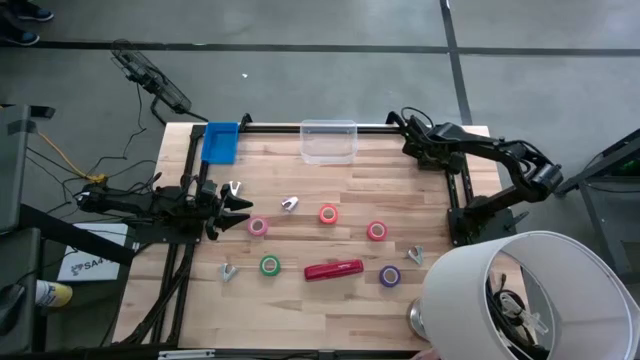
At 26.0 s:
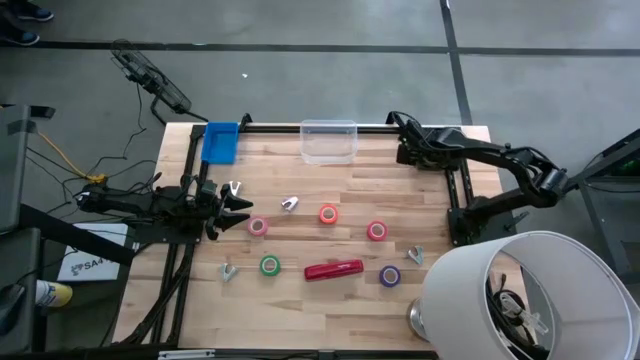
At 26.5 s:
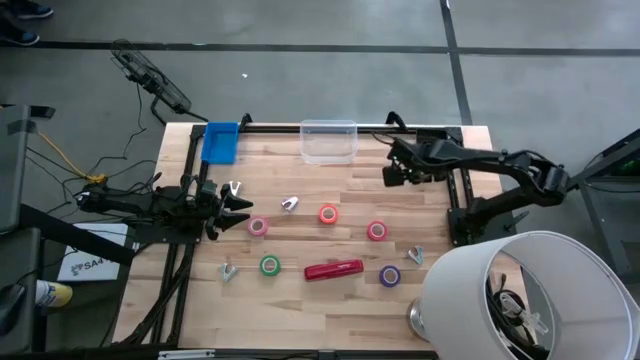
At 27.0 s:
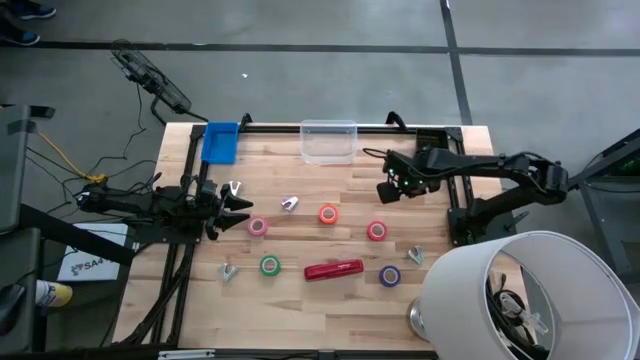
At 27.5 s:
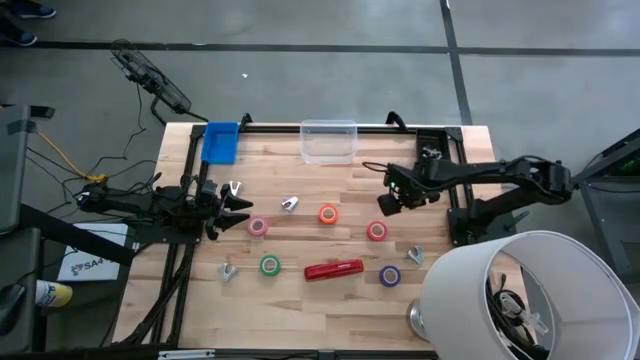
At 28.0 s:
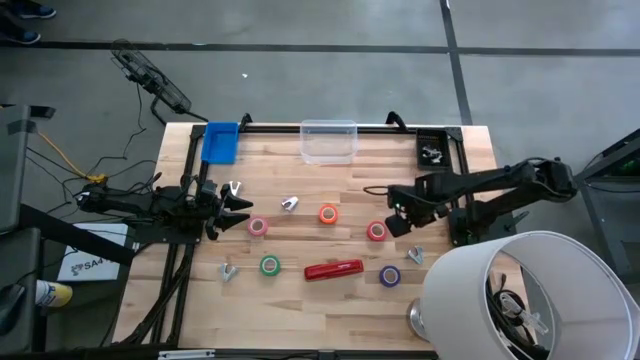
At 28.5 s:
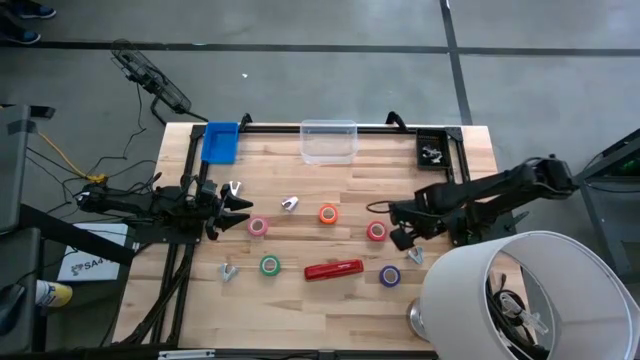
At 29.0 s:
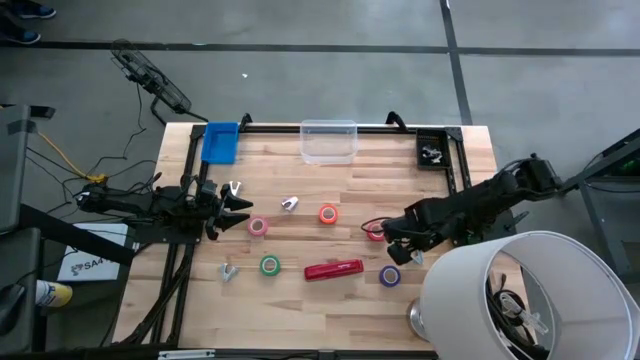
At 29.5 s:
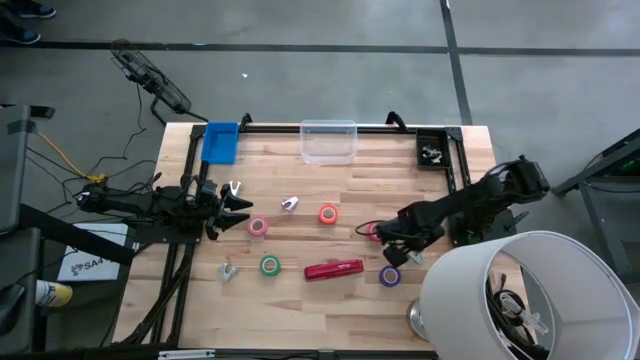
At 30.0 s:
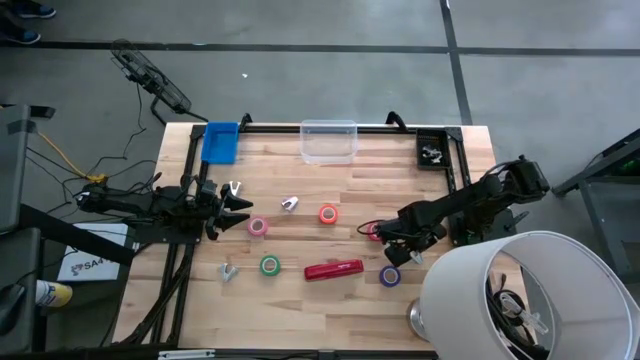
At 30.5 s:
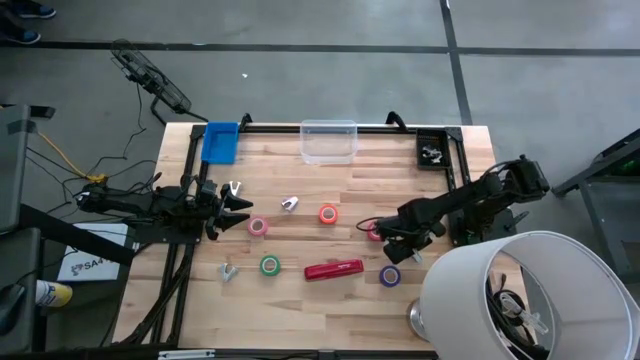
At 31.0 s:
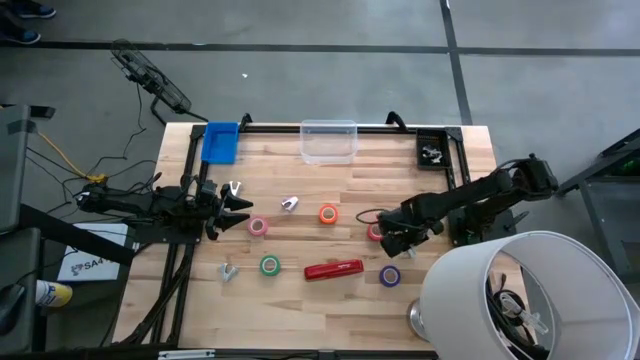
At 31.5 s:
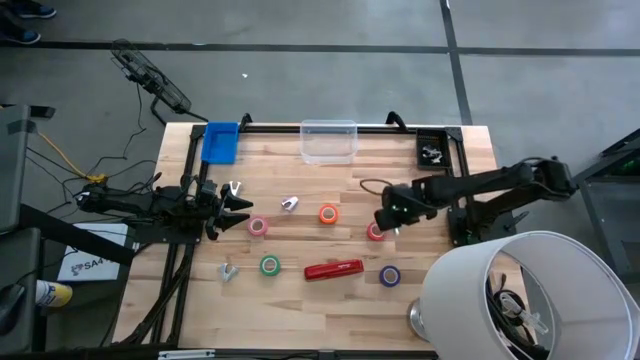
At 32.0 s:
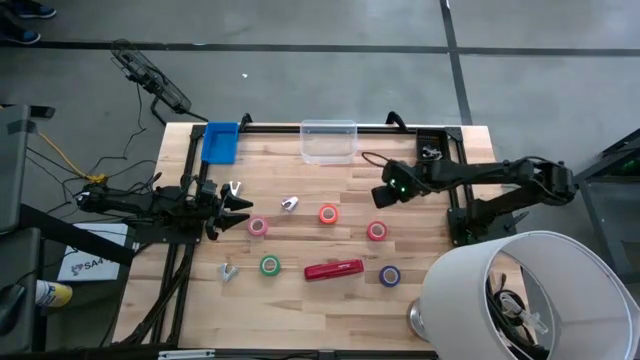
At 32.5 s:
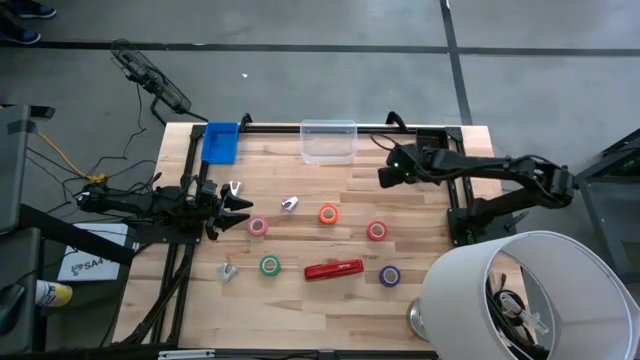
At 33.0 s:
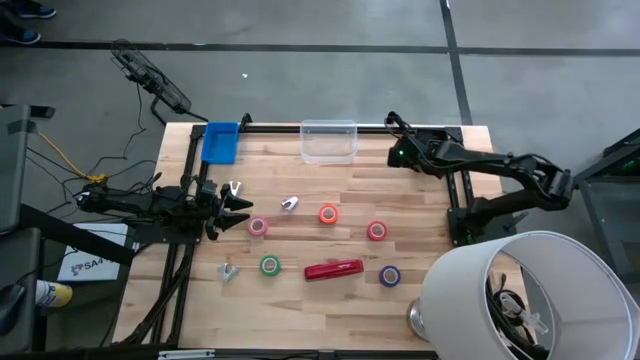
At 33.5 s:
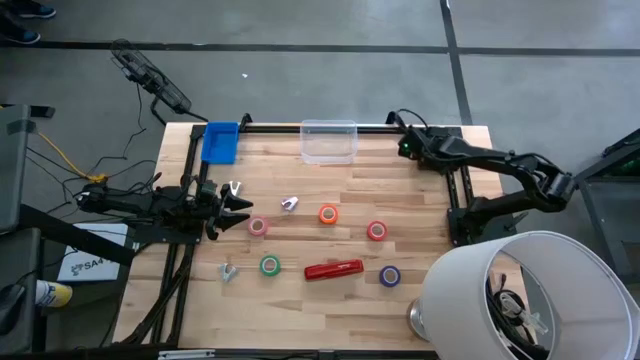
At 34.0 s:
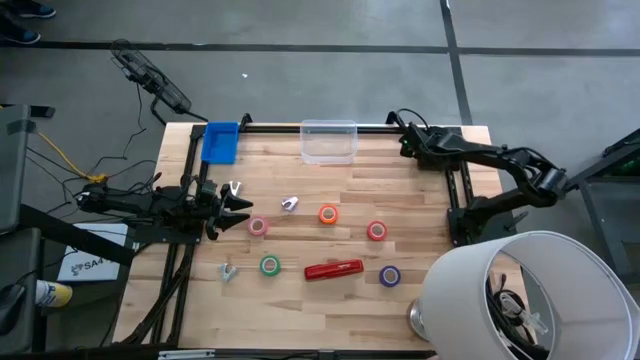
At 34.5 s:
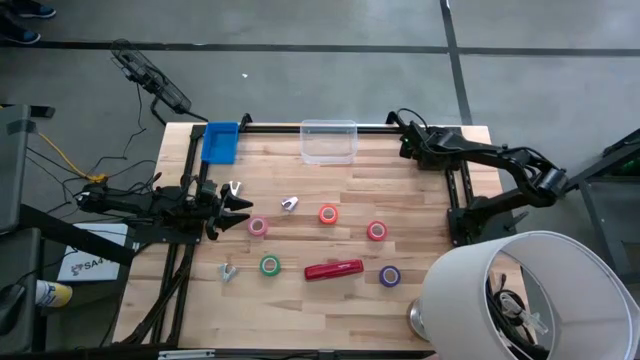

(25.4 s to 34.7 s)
Task: Pick and place Stapler, Stapler remover, tape
Put the right blue staple remover into the black bin

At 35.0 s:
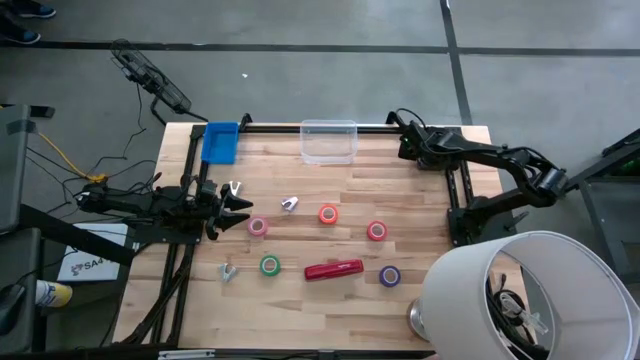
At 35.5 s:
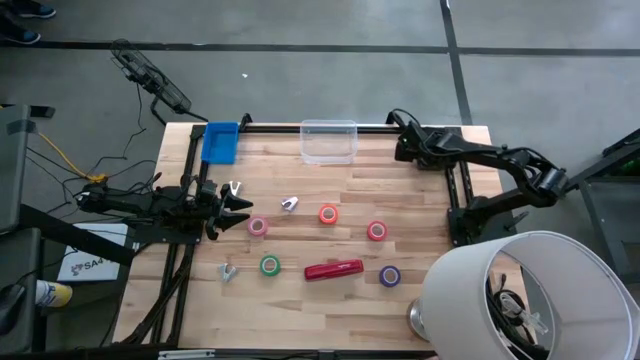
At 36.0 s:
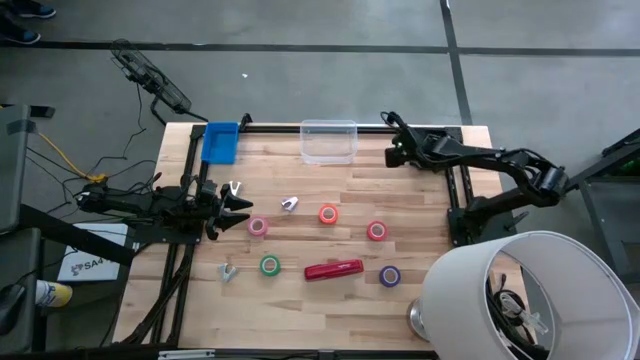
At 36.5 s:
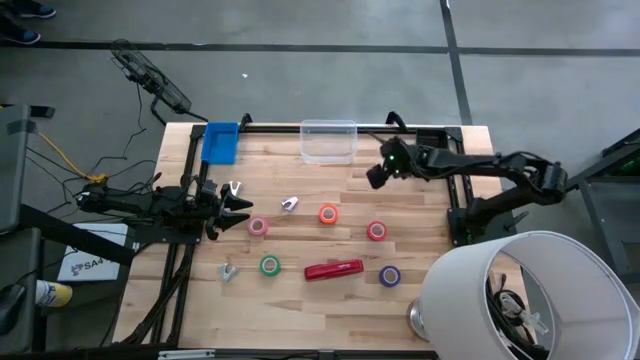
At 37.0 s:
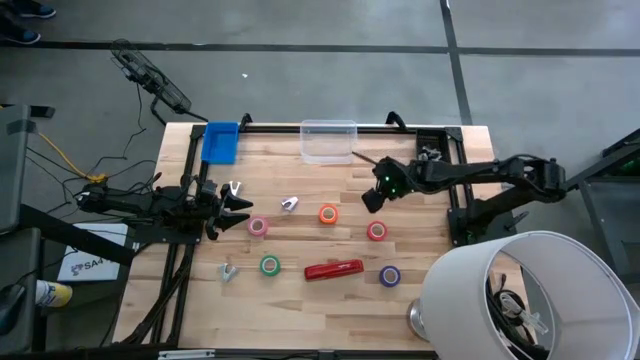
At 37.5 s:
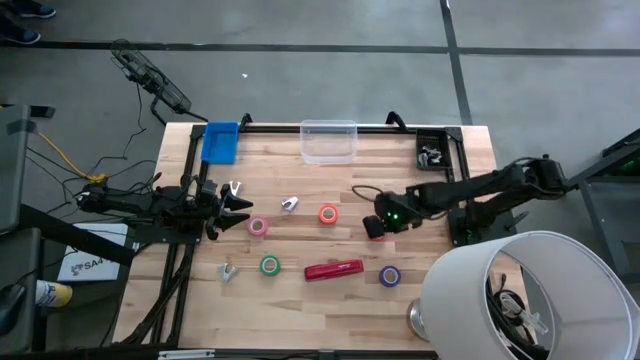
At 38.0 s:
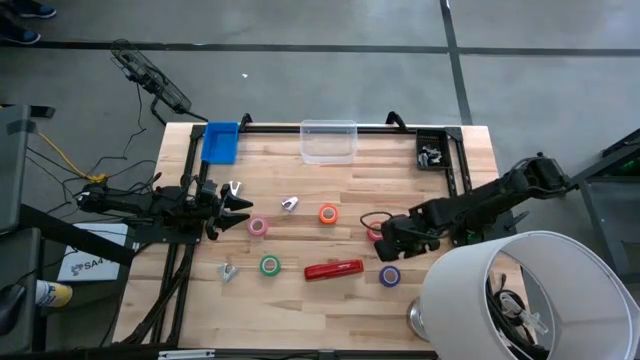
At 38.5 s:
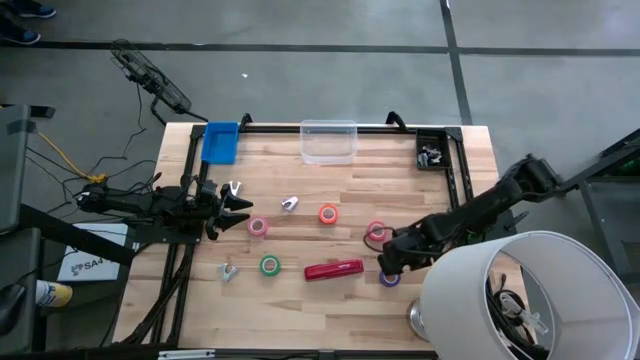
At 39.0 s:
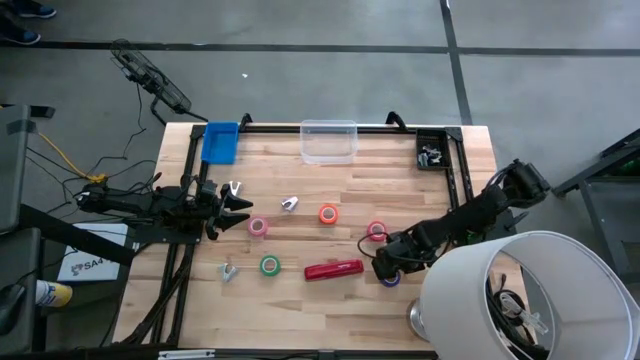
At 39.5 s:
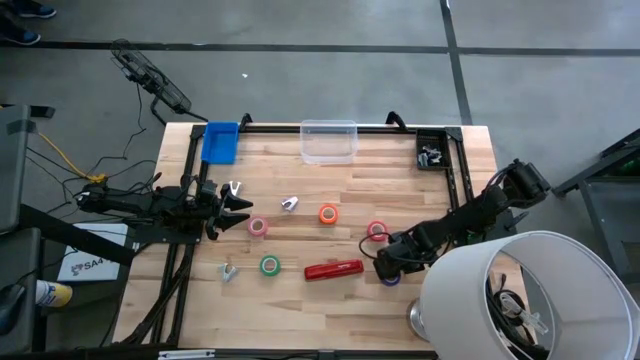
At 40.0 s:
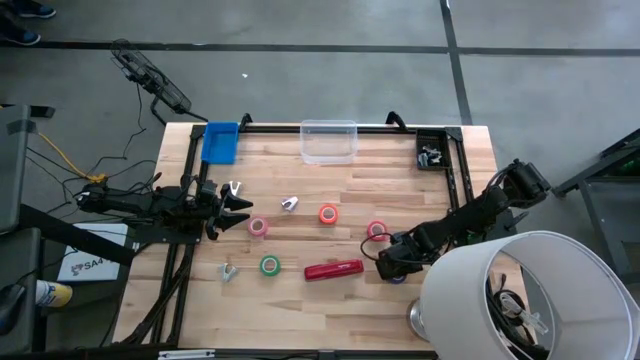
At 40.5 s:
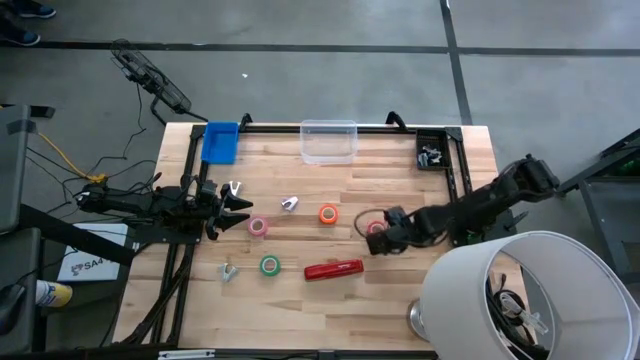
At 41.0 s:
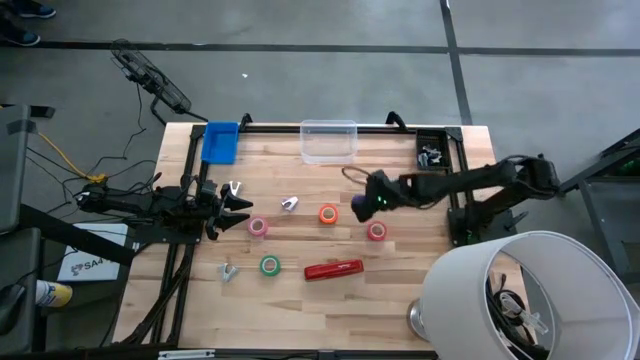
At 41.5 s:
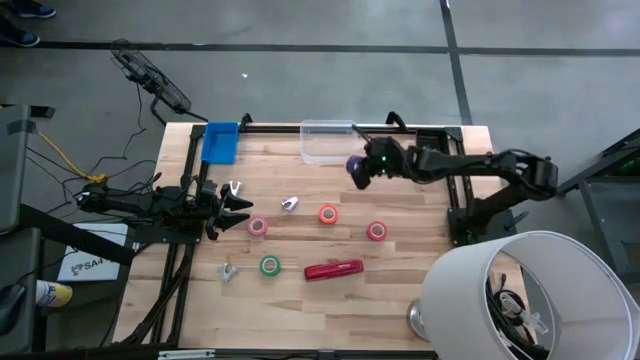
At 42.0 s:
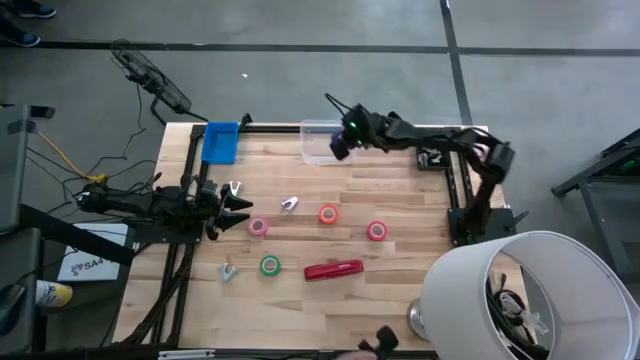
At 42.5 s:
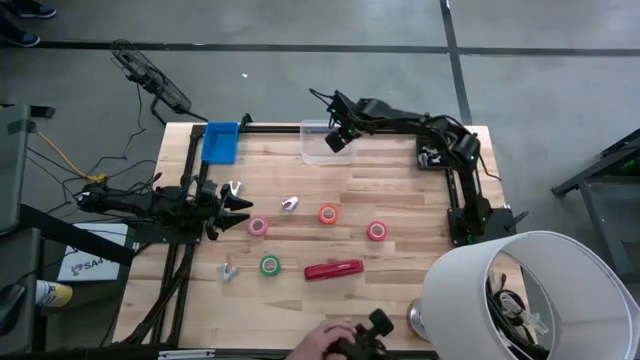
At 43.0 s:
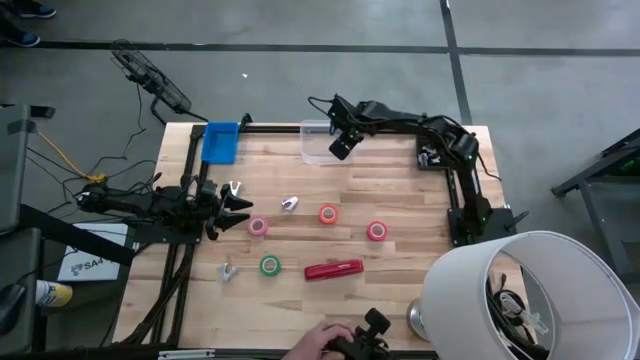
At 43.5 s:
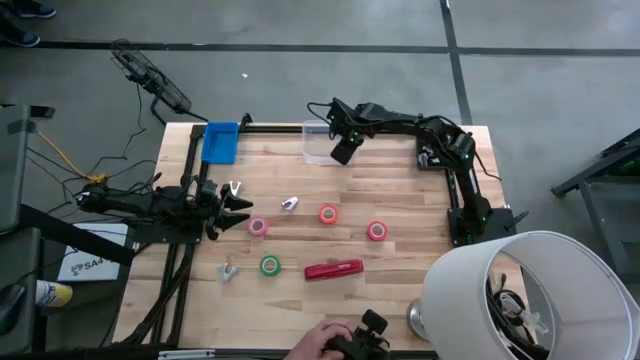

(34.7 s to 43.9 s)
Put the blue tape into the transparent bin

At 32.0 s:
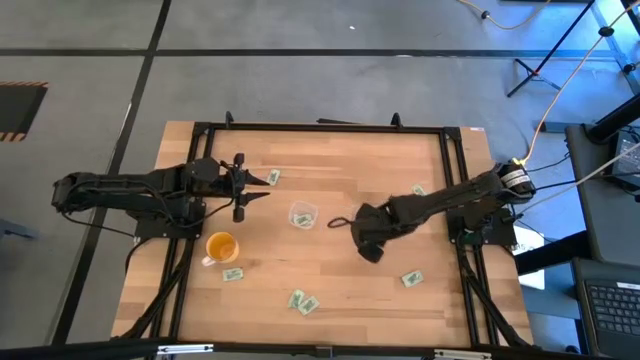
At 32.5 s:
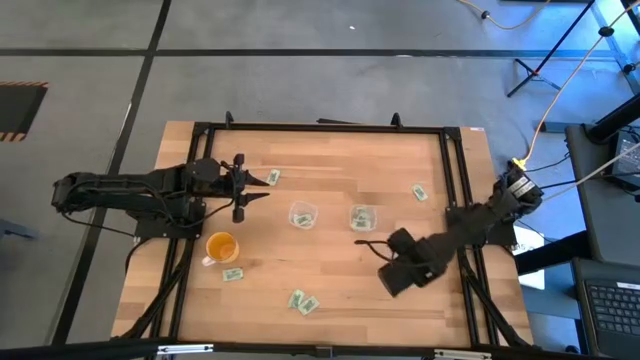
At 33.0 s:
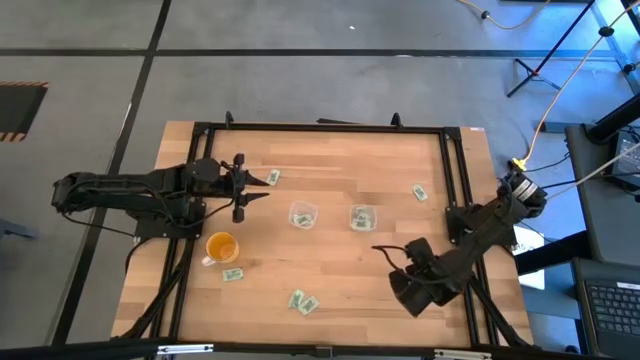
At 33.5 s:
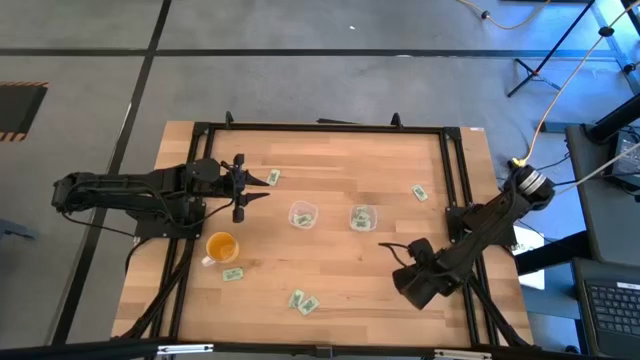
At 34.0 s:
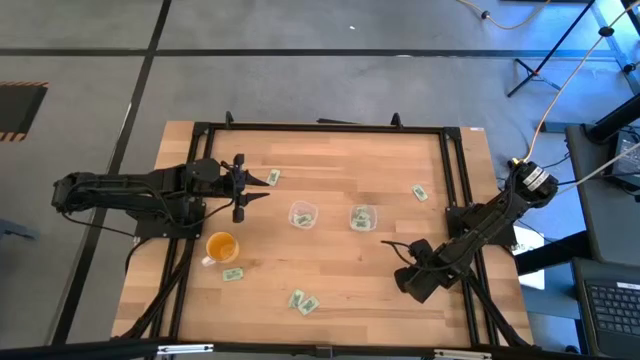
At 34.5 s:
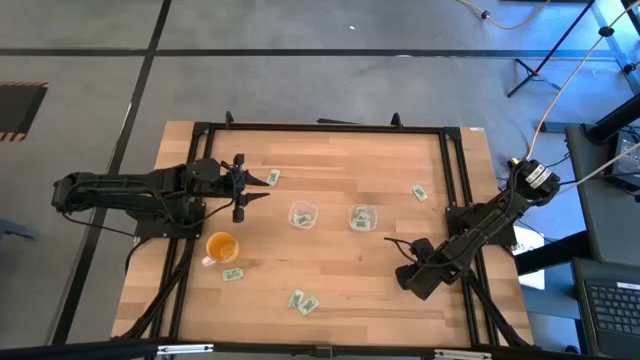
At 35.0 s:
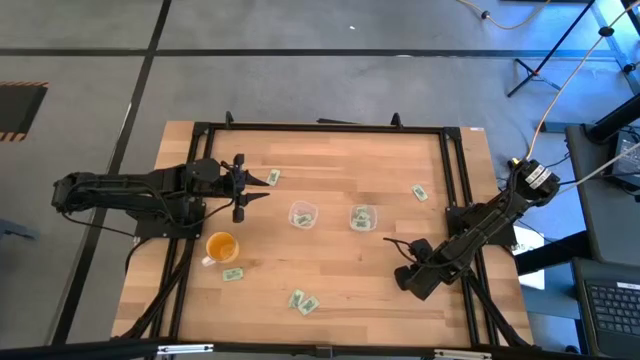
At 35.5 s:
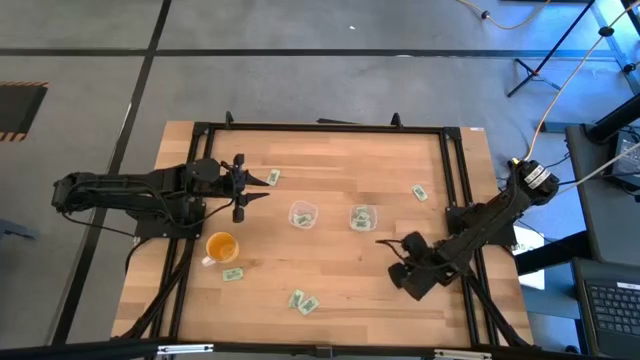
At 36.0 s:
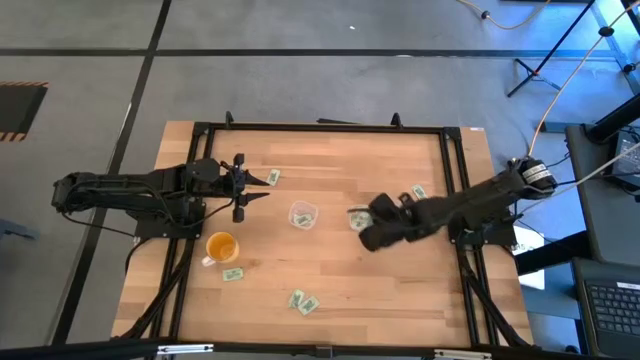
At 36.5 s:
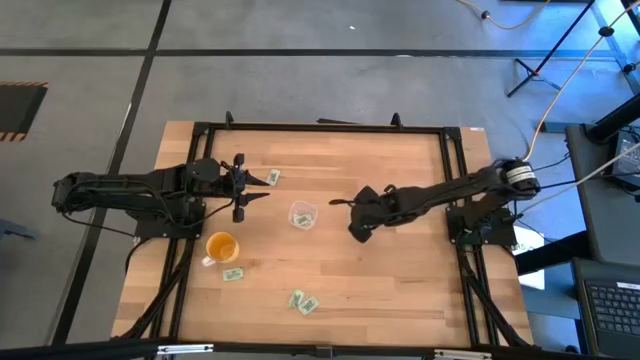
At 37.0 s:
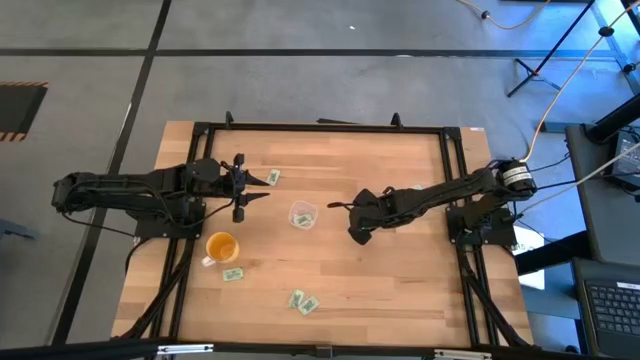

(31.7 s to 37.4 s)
Task: Pick and place Stevia / Truvia into bins
Put the stevia packet into the right transparent container
